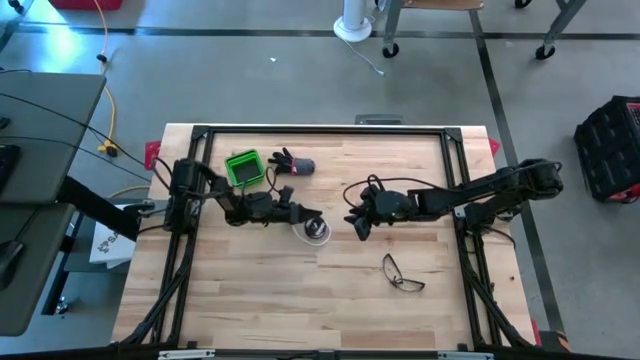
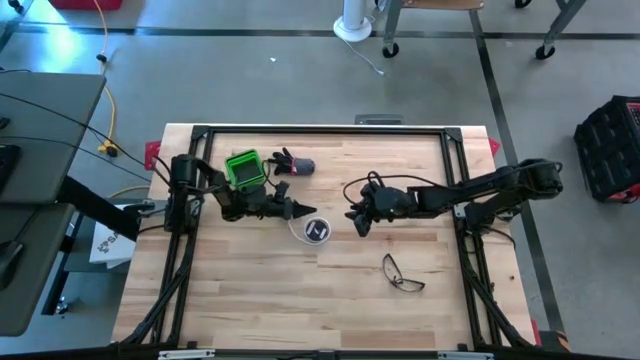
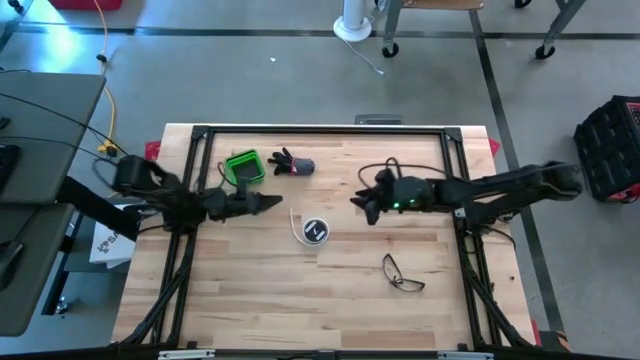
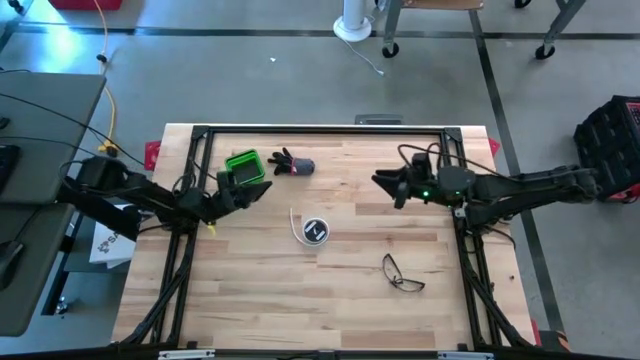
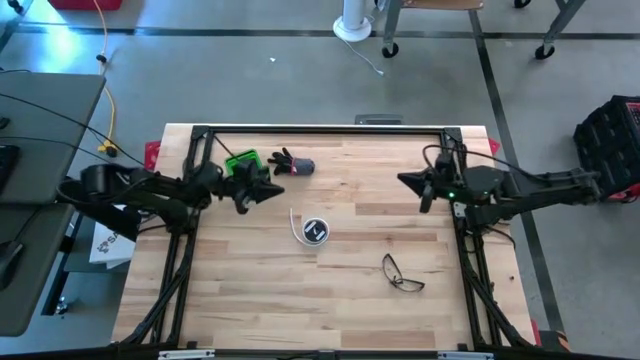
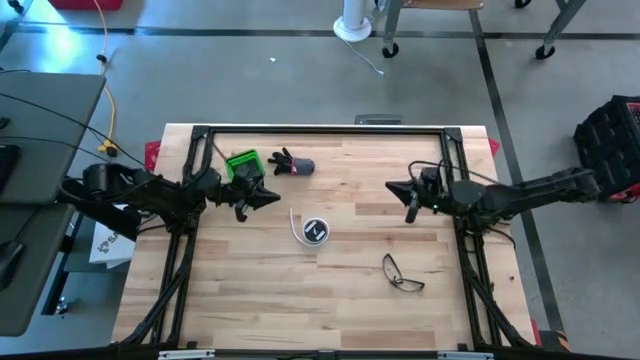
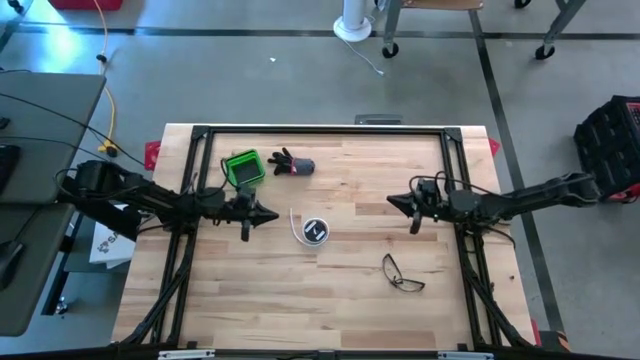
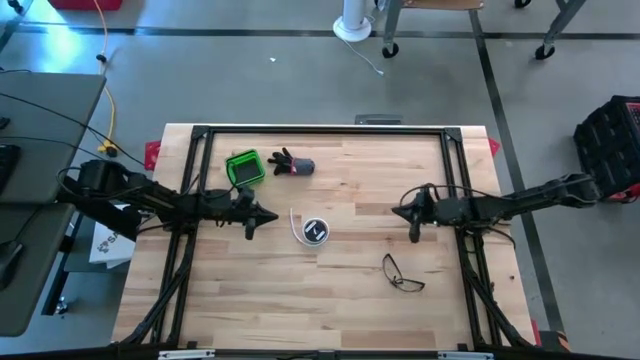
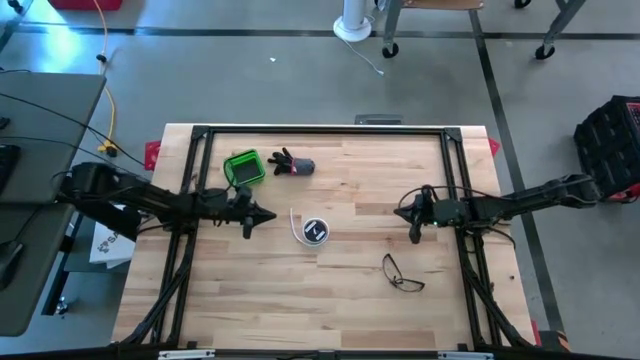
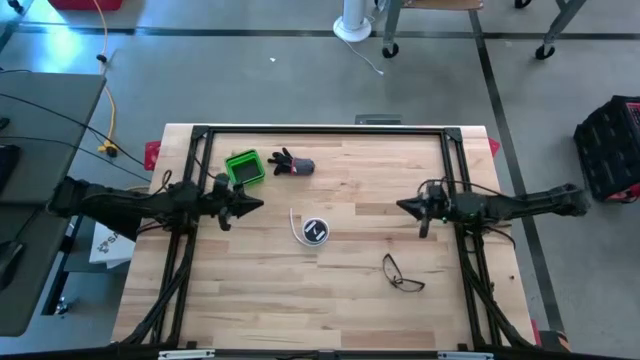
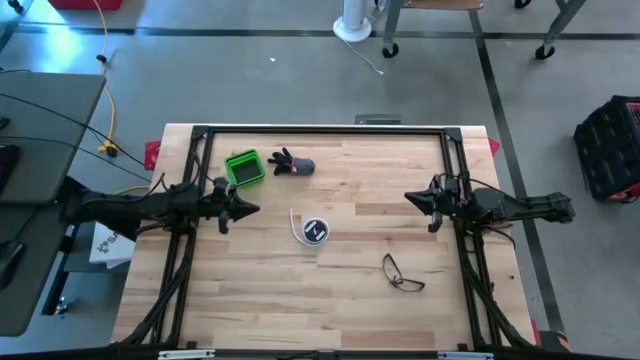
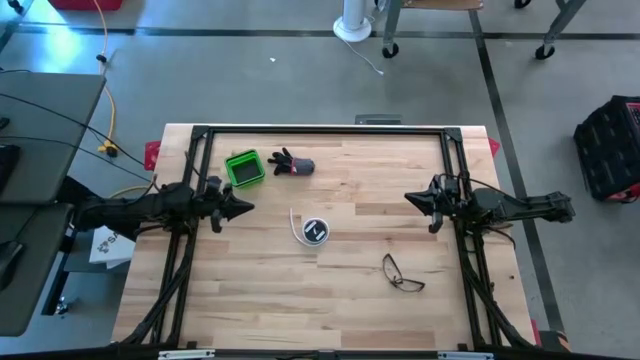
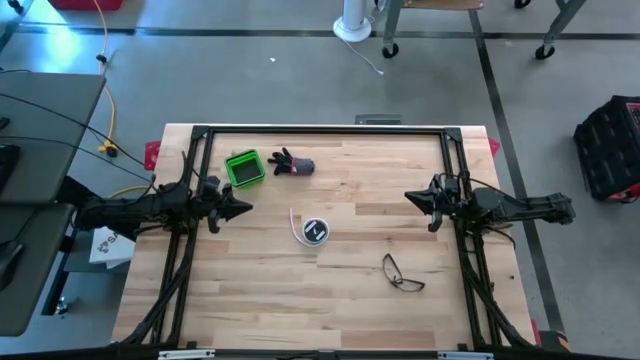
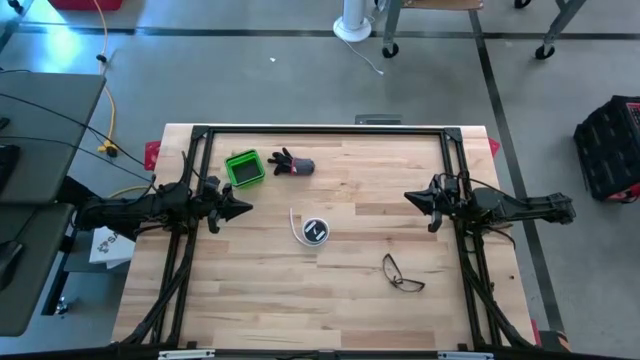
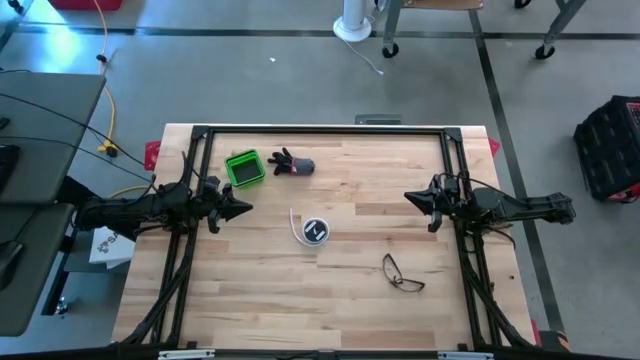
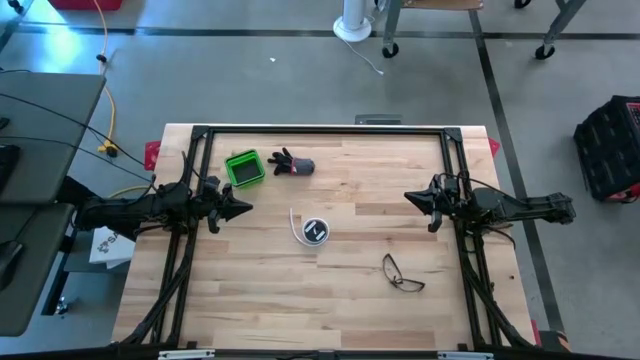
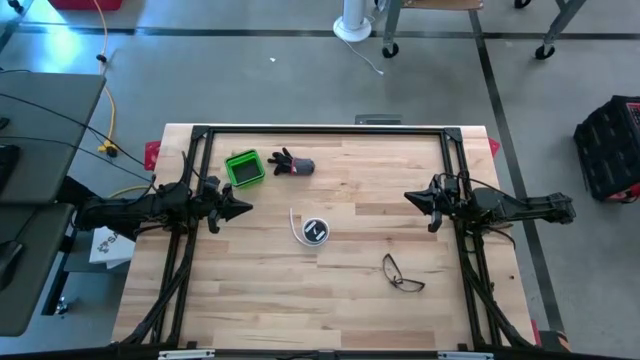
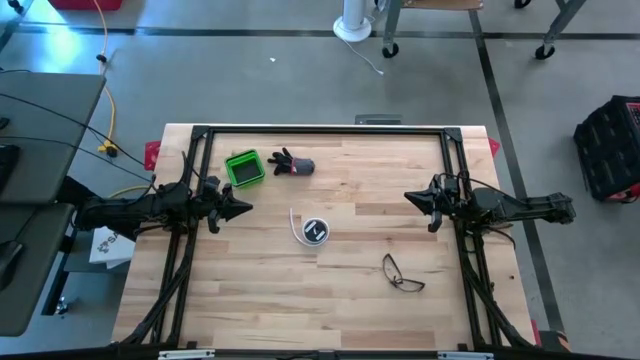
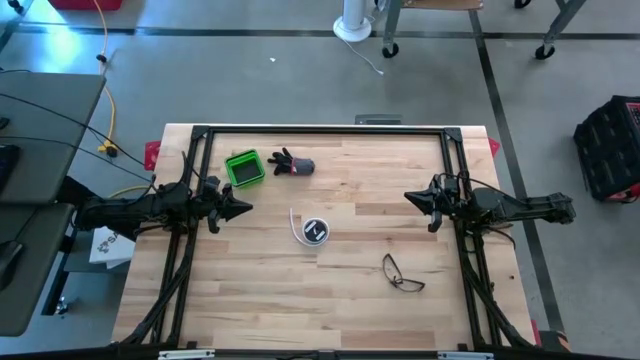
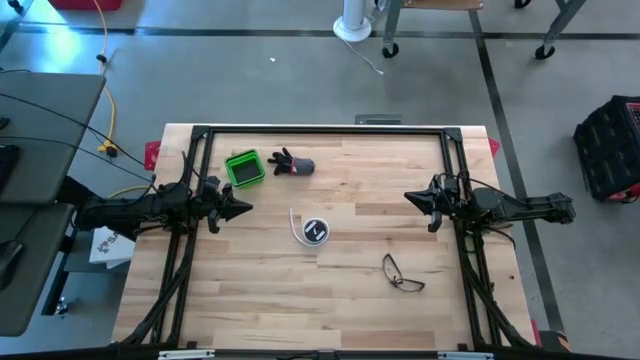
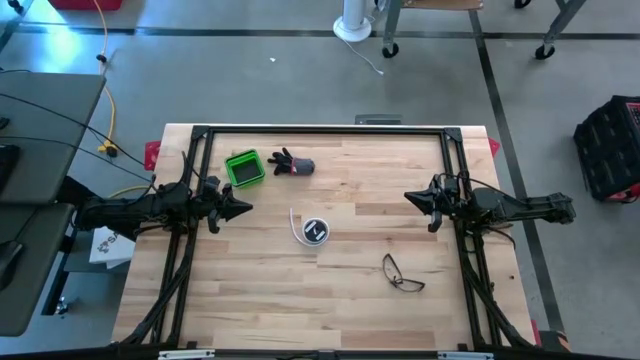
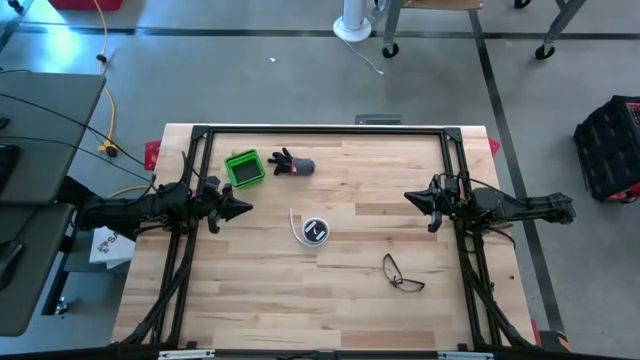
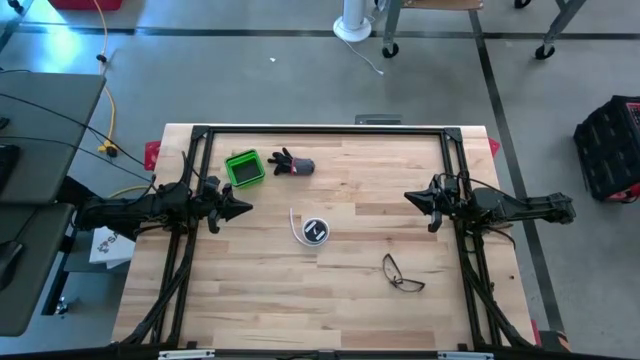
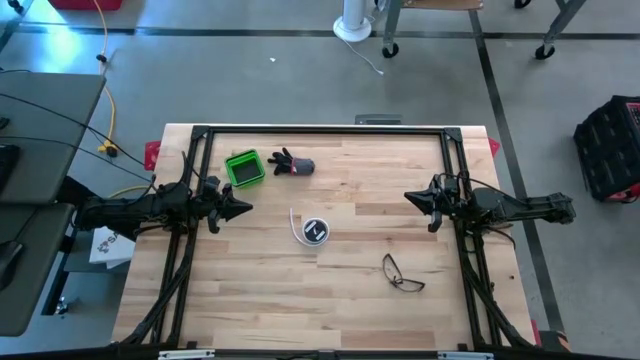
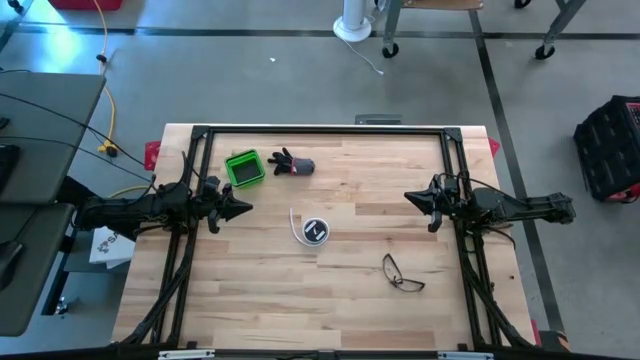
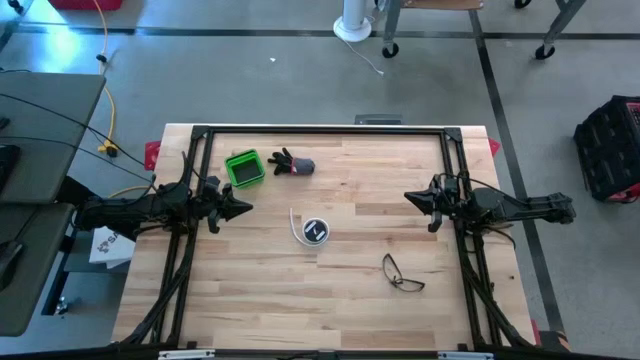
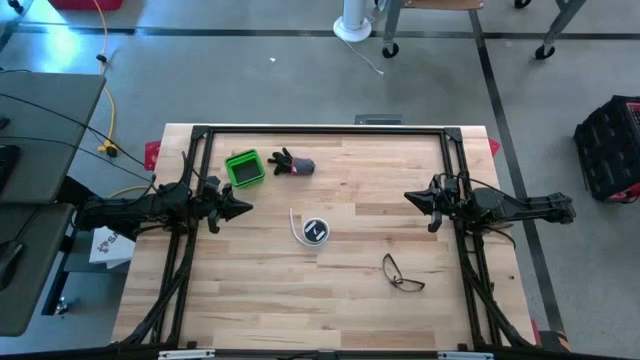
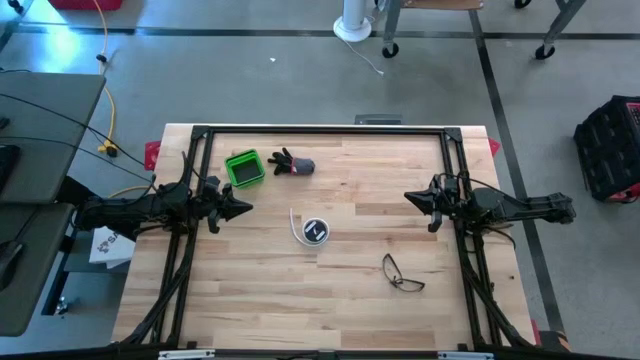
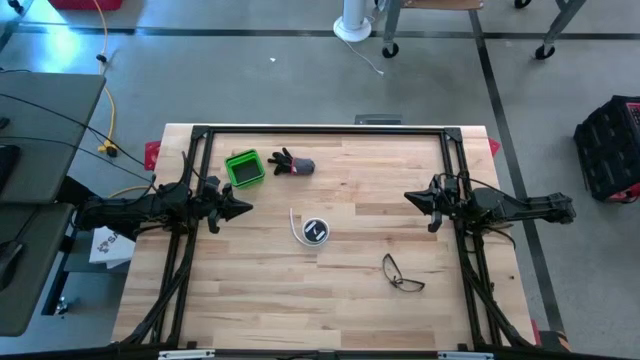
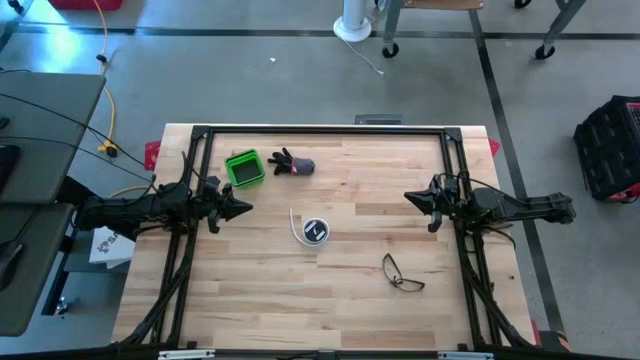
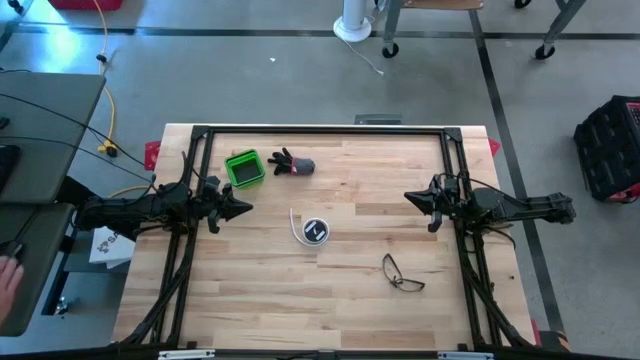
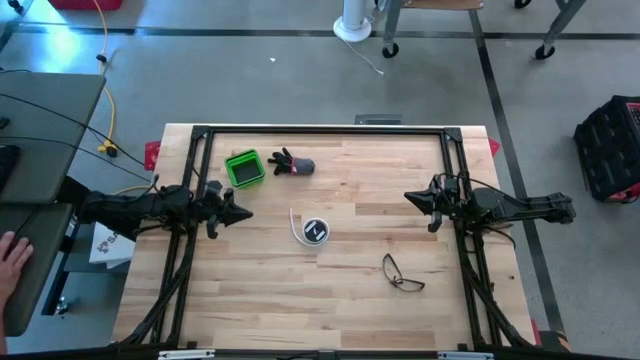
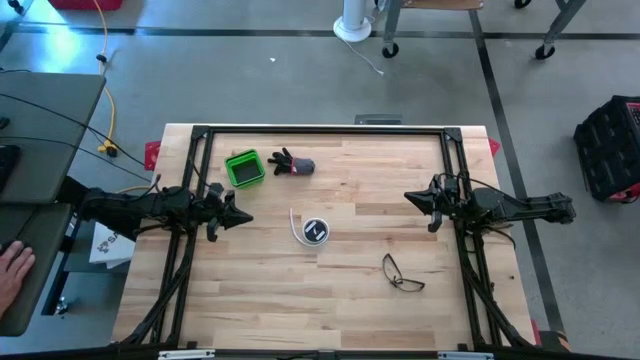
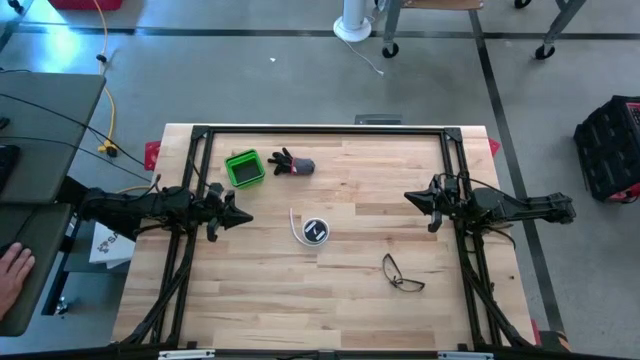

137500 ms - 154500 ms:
Task: Coil cords
Return to Home Position

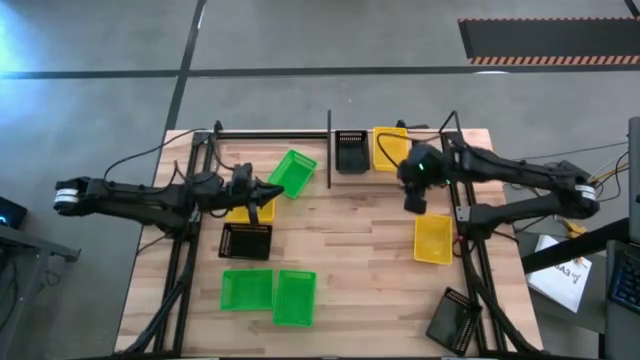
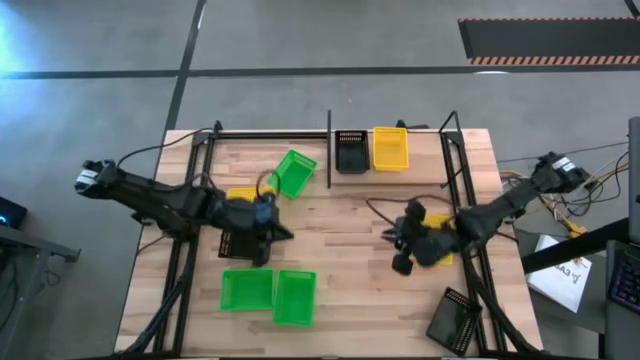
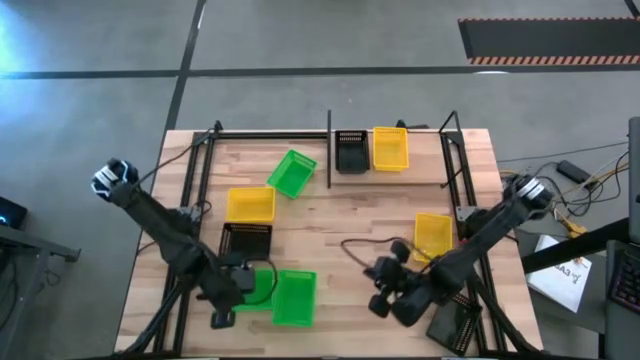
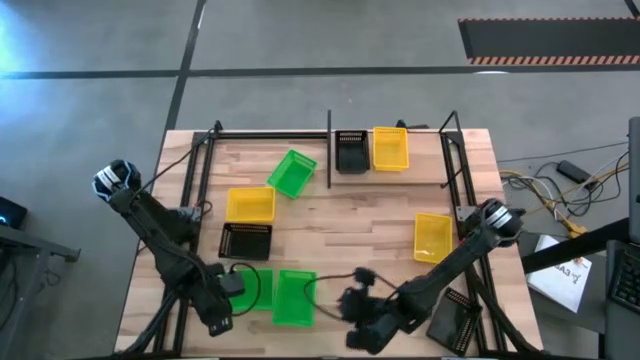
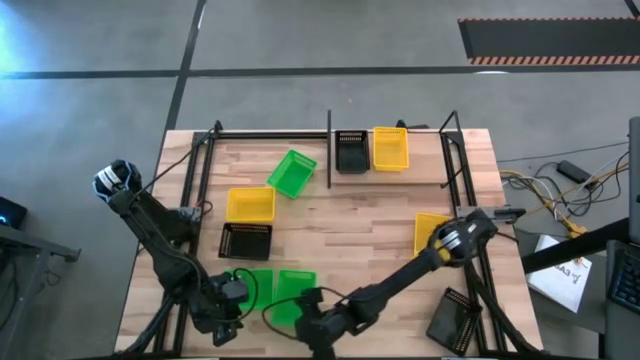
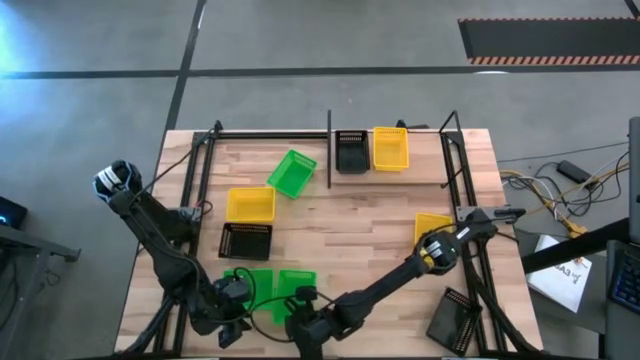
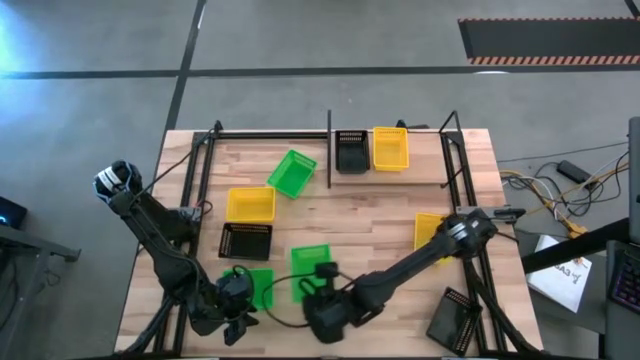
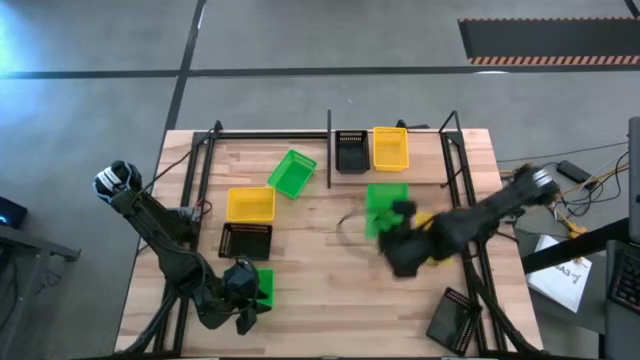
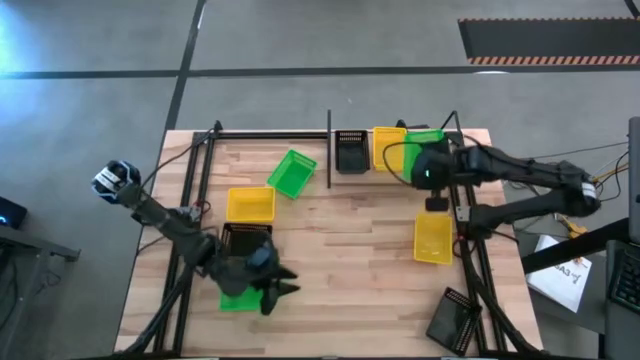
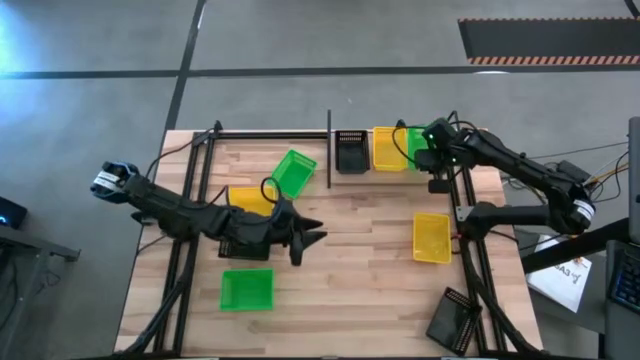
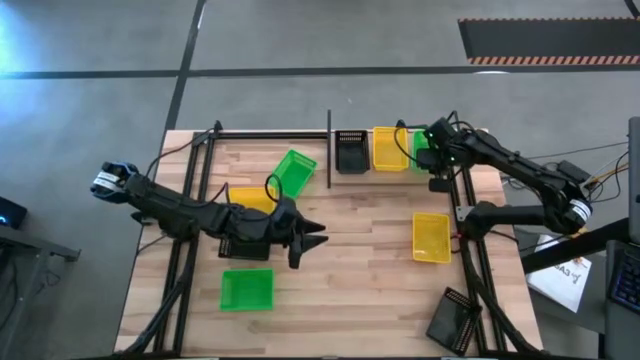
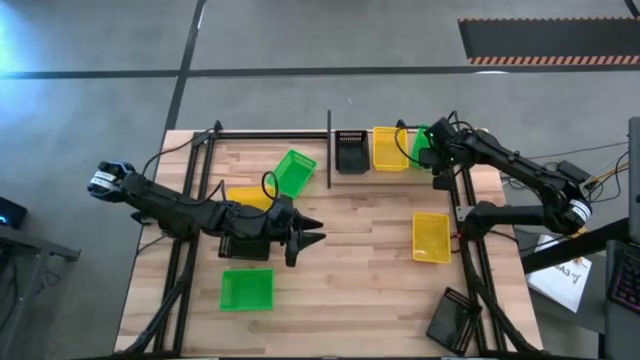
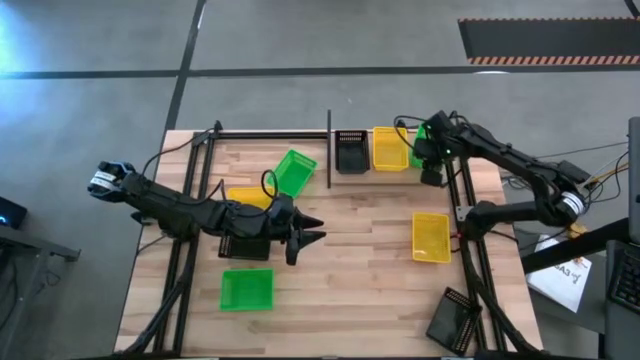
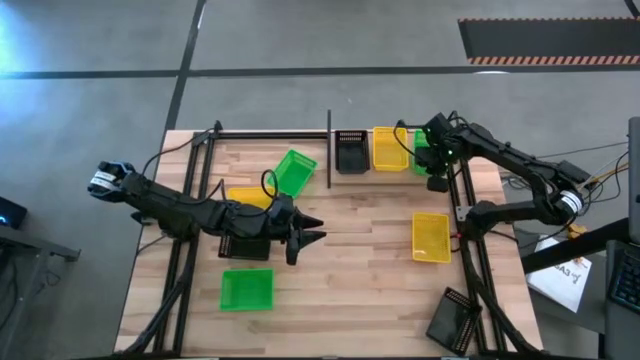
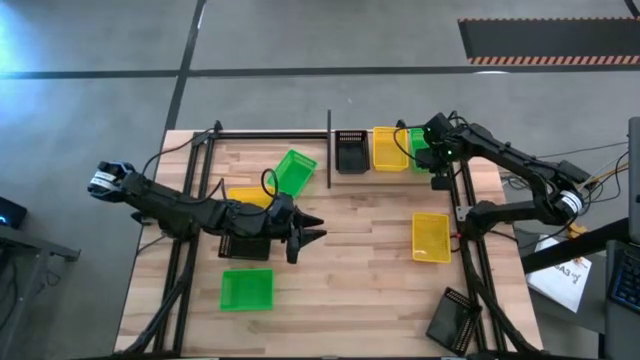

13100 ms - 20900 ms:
Task: Stack baskets on shelf by color
Put the bottom right green bin on the shelf
